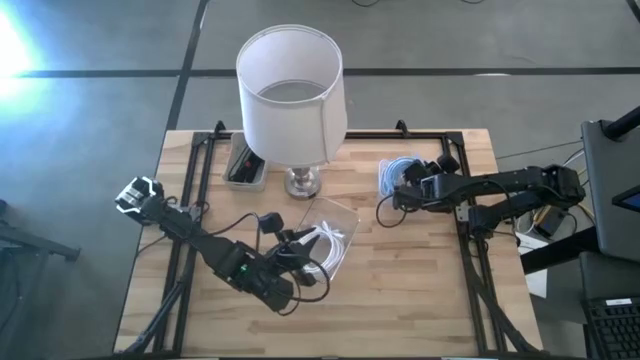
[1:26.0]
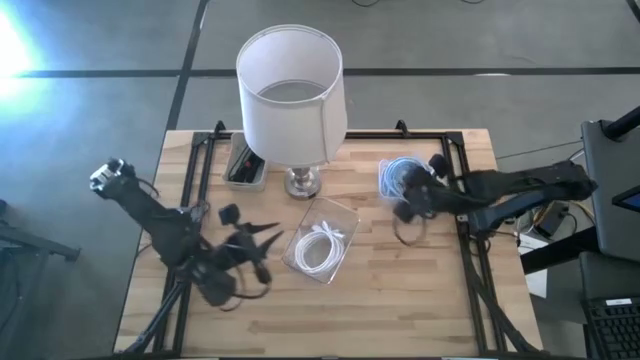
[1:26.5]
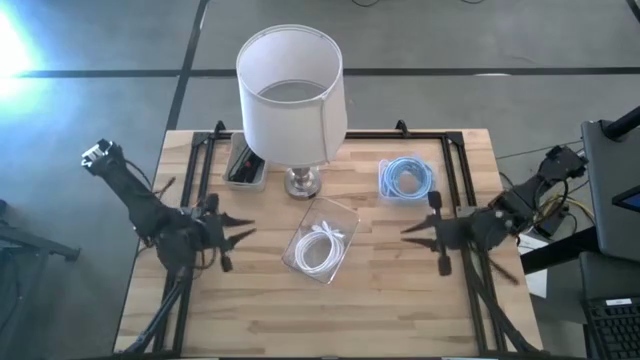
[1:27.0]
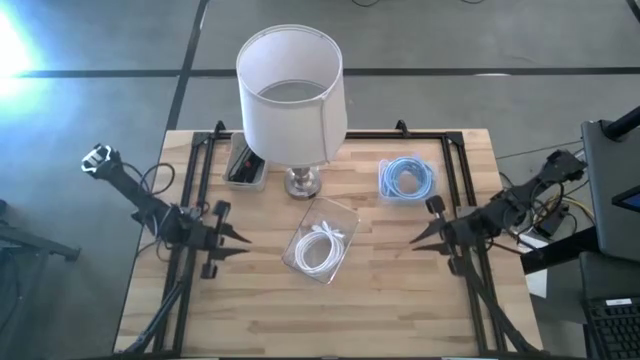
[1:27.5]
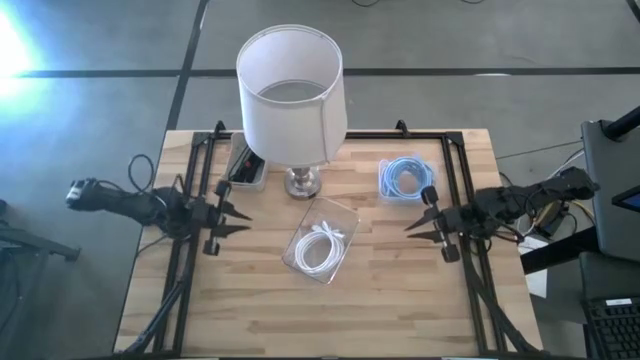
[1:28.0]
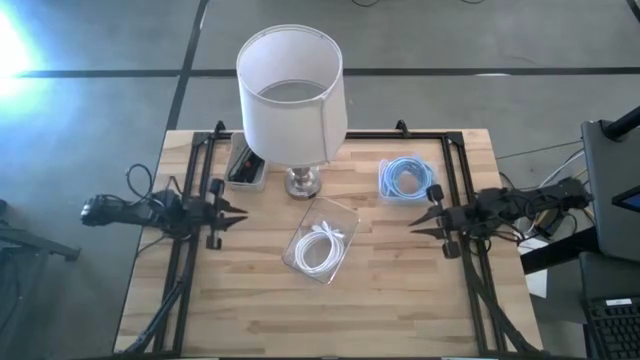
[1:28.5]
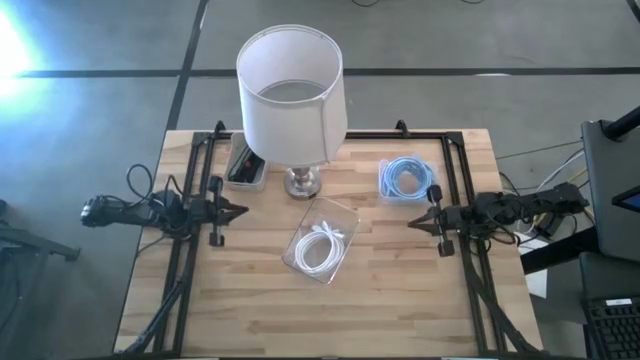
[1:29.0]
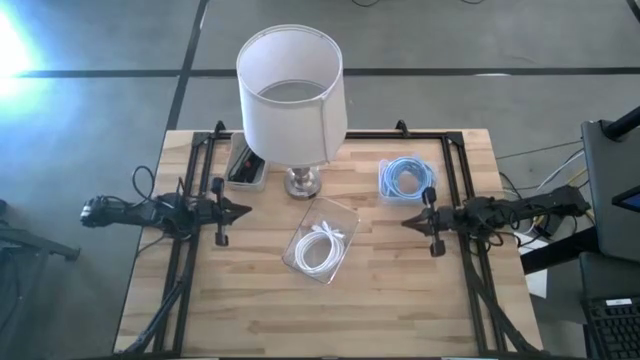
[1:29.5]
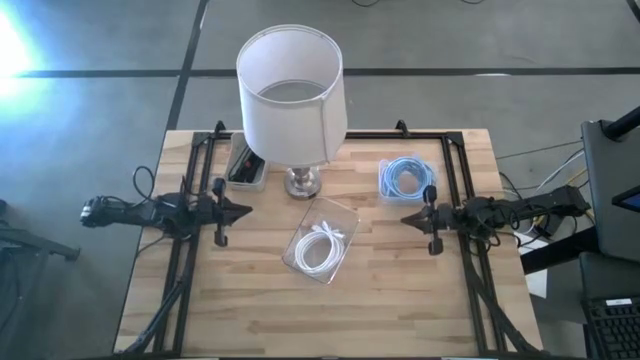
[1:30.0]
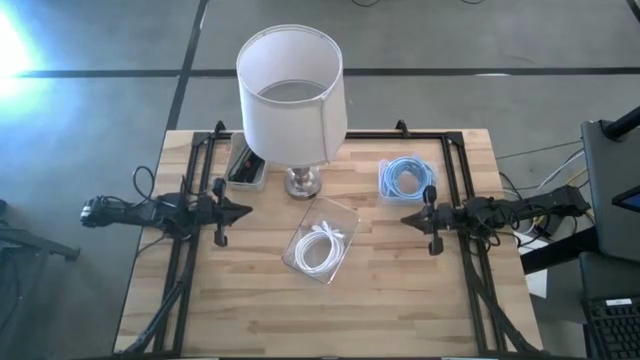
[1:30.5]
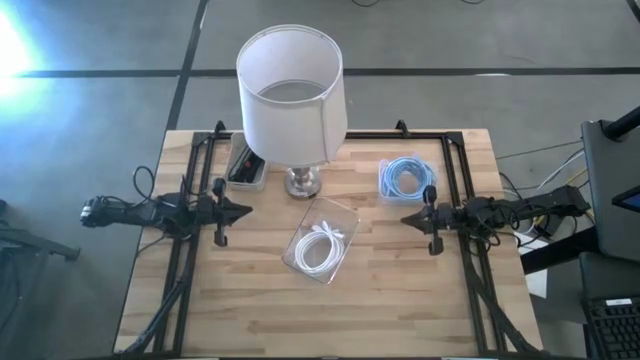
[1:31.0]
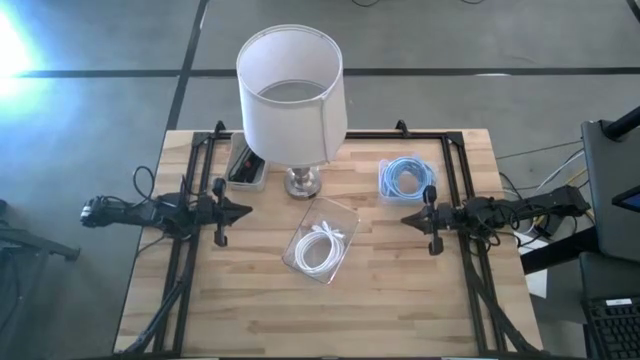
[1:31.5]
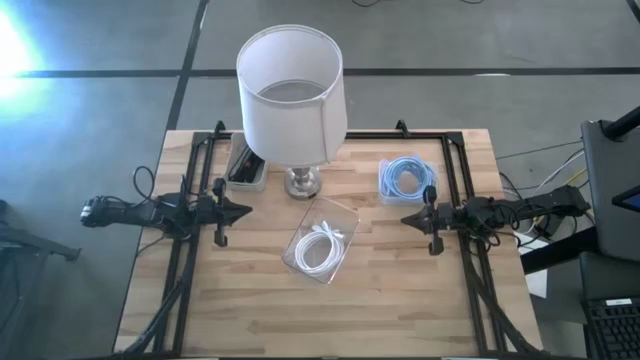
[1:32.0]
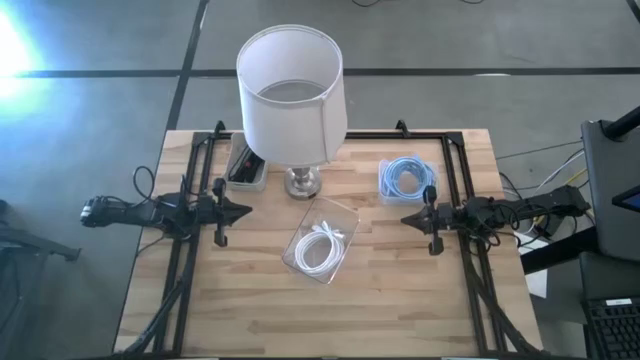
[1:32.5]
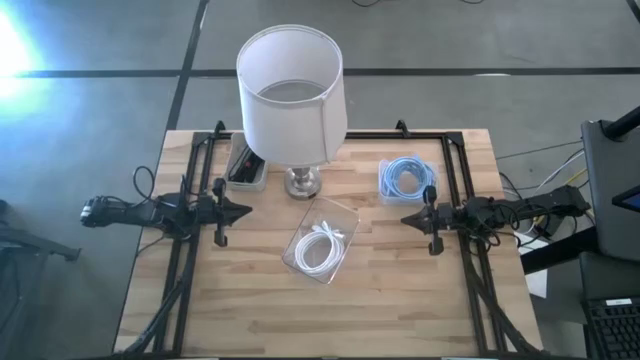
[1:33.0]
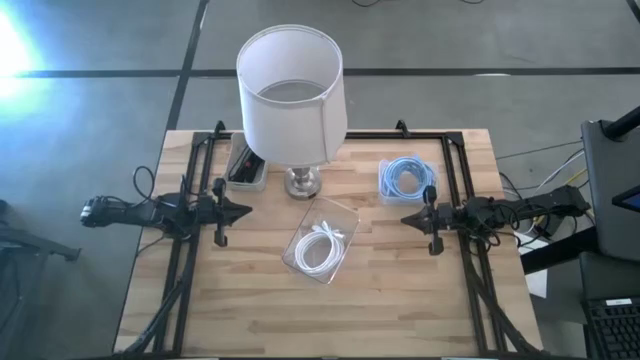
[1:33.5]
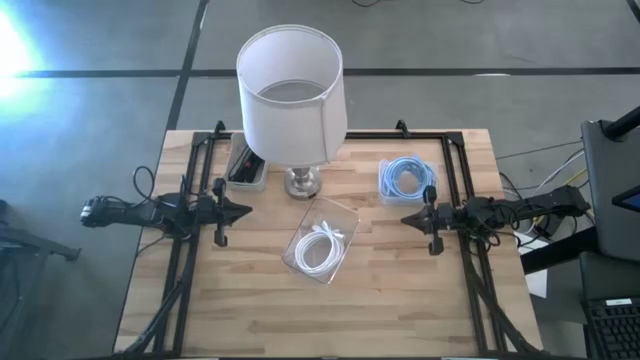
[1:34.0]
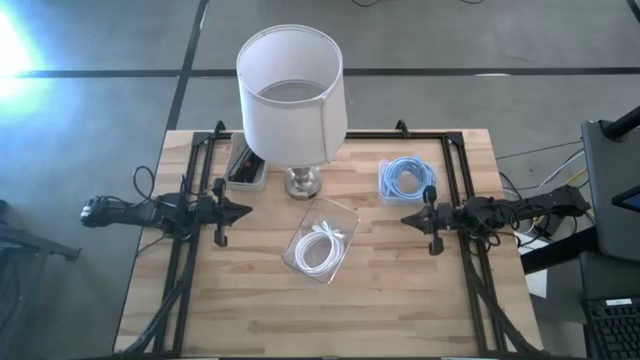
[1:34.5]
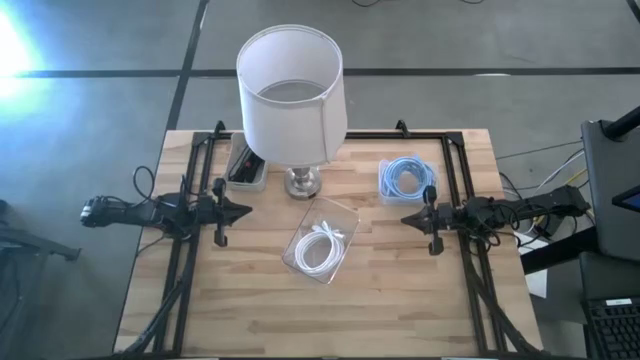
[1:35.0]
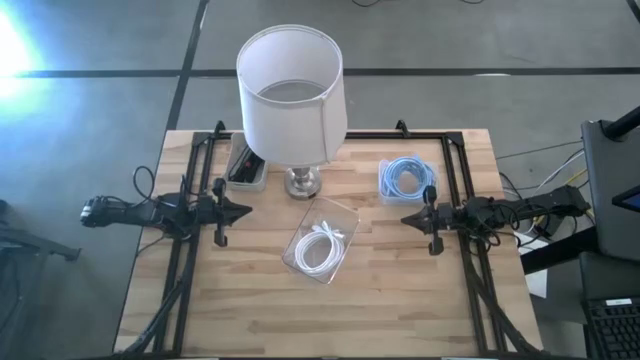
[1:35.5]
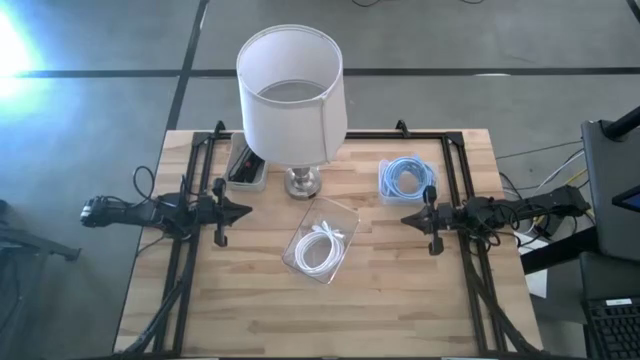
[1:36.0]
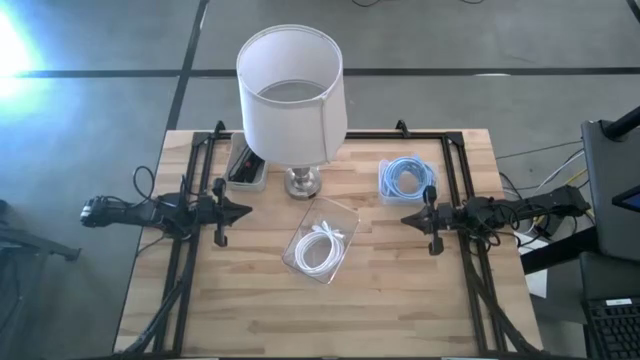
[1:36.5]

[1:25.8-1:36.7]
Task: Pick & Place USB Port
Return to Home Position

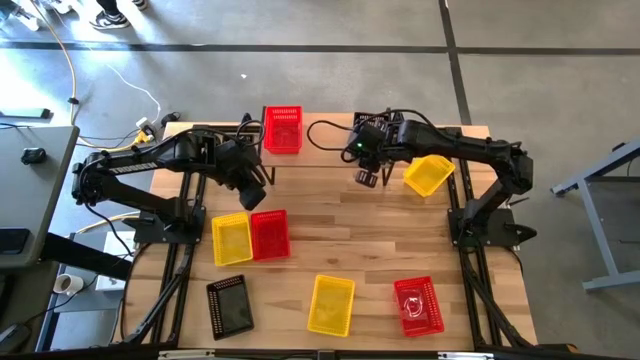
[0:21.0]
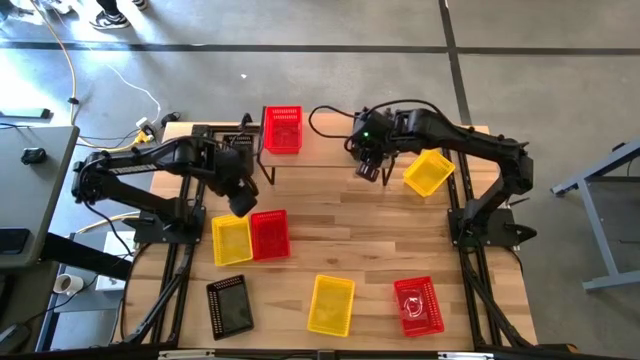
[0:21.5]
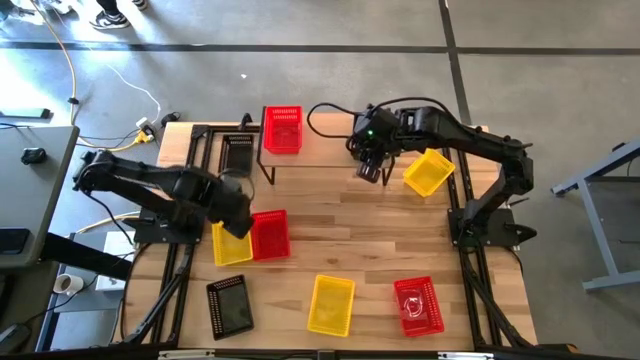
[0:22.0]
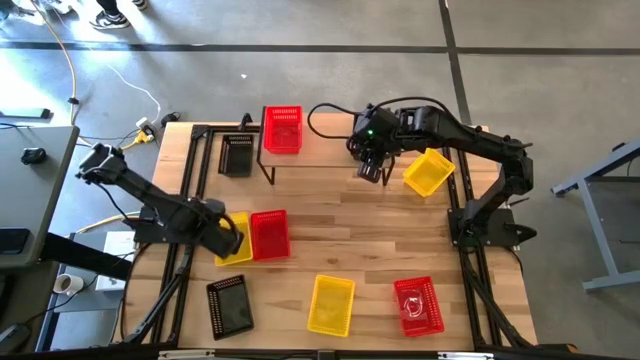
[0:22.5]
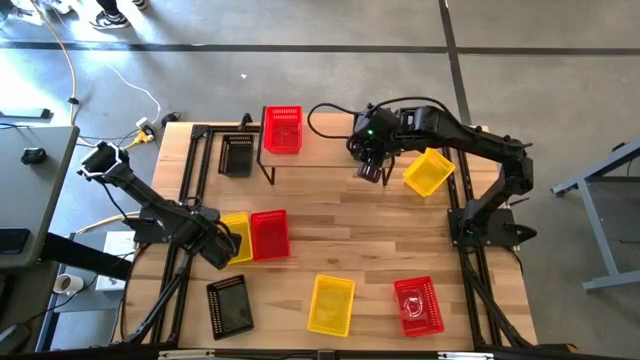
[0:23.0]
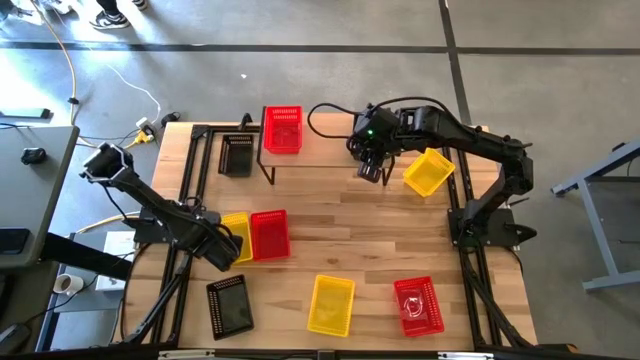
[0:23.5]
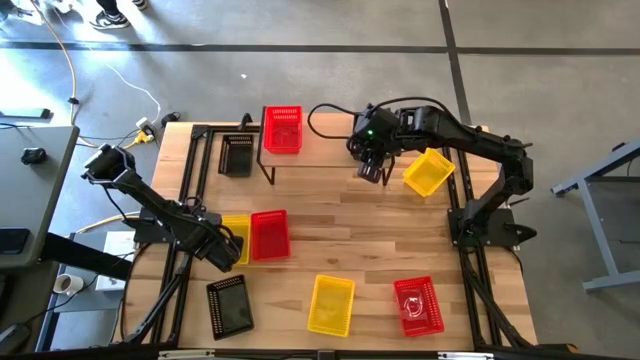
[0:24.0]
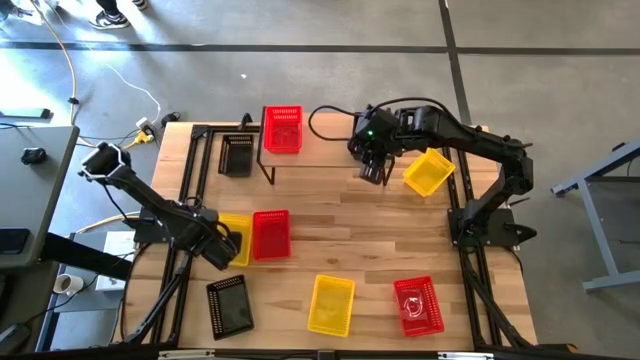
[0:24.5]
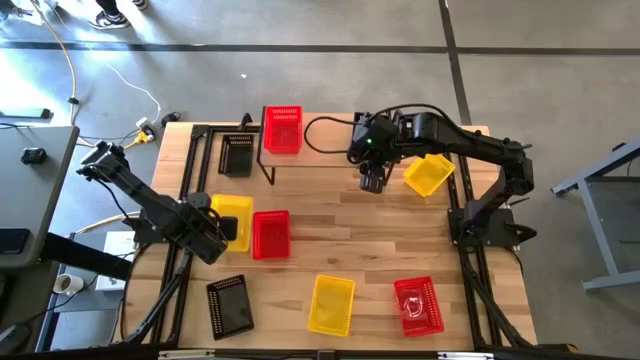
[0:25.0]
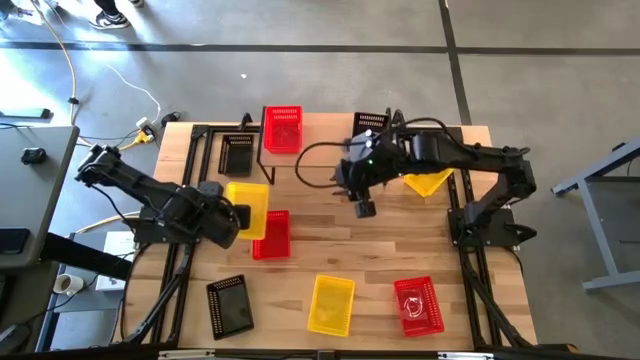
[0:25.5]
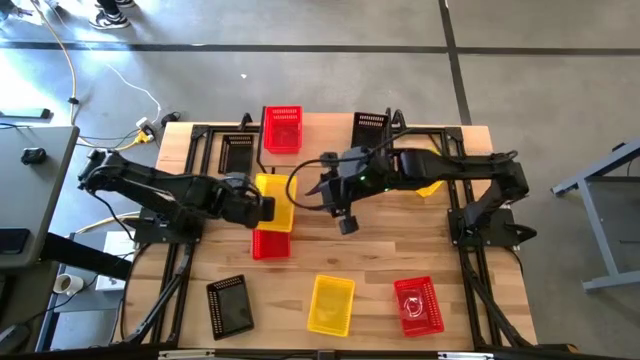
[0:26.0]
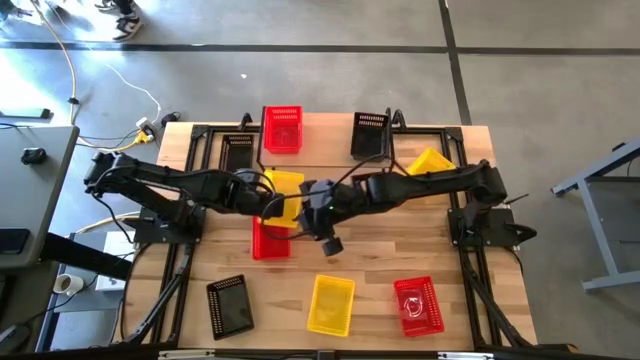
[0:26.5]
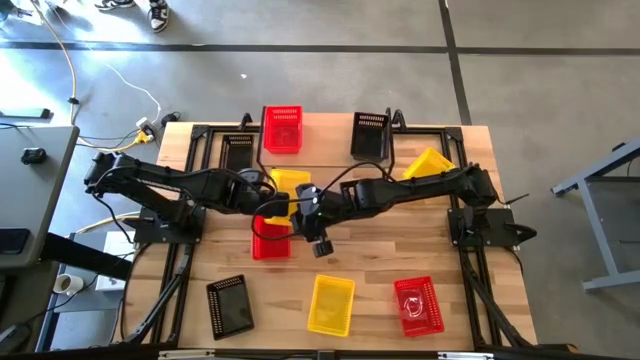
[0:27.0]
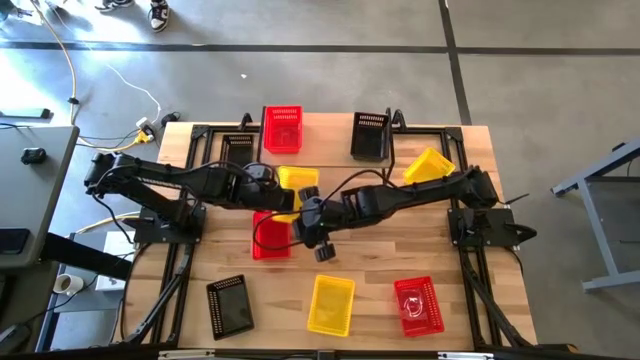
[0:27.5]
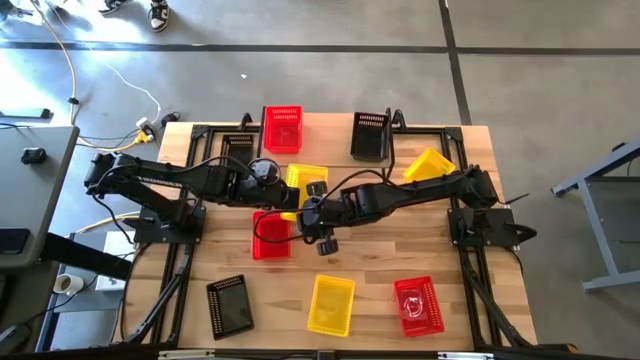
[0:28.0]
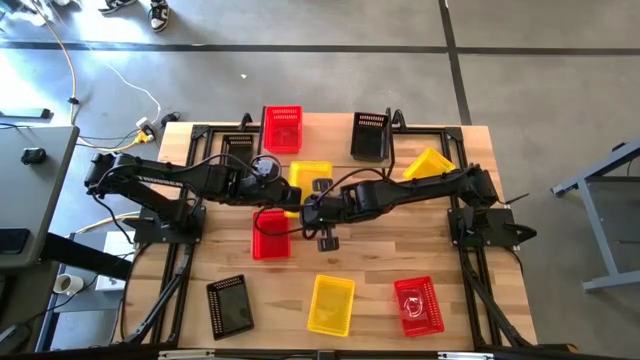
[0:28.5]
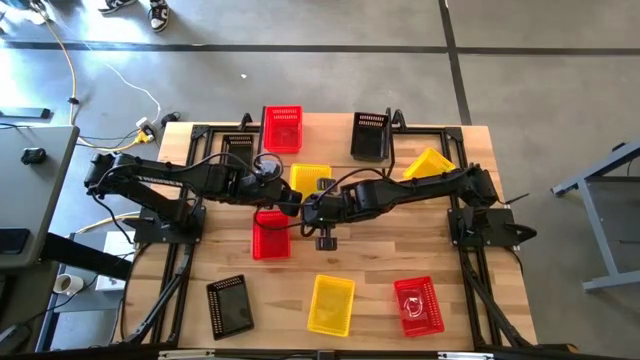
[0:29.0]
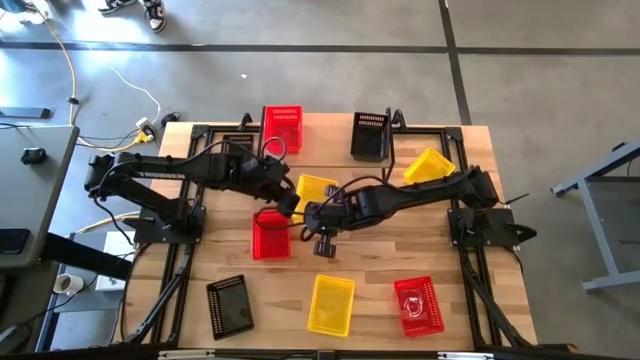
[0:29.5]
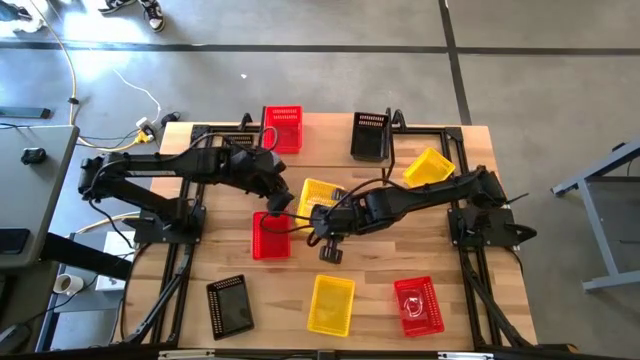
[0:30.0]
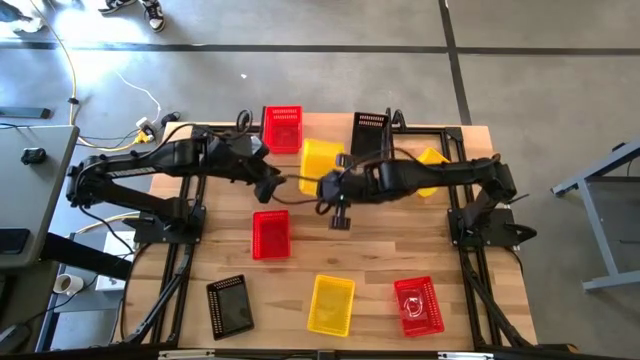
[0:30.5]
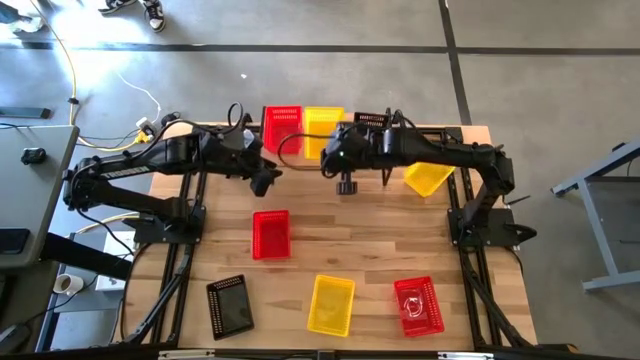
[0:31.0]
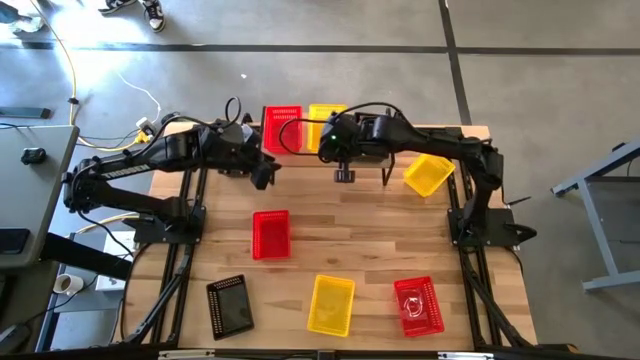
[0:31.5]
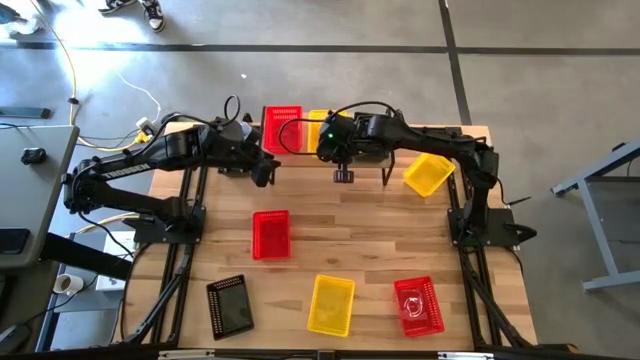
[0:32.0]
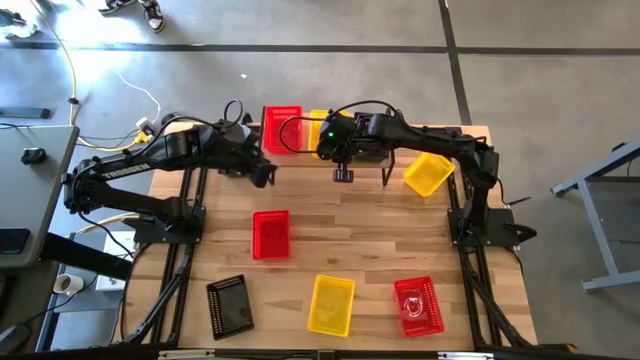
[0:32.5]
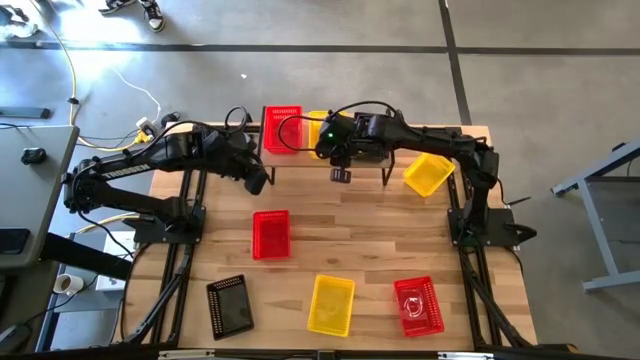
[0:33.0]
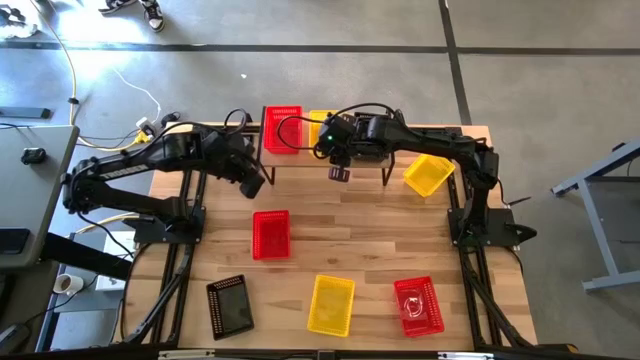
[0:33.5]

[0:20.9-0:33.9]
Task: Stack baskets on shelf by color
Put the middle left yellow bin on the shelf
